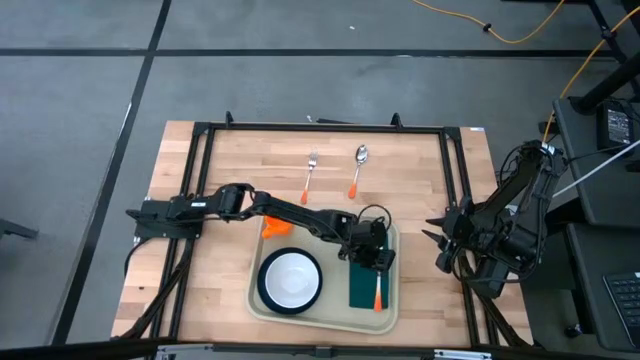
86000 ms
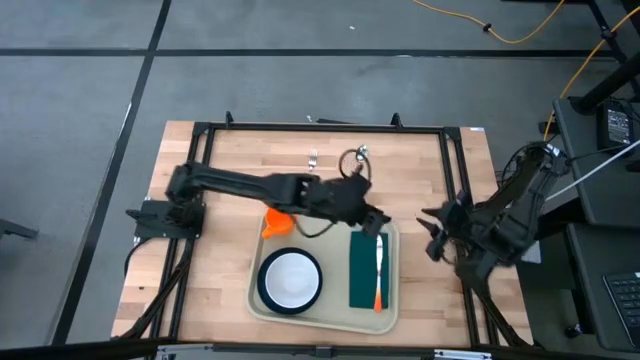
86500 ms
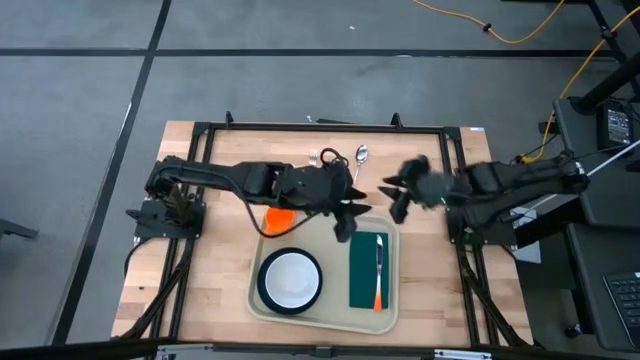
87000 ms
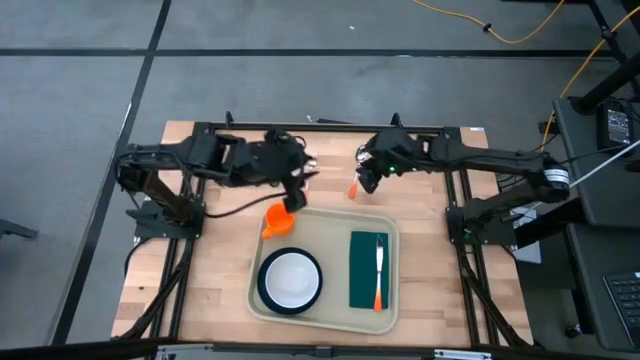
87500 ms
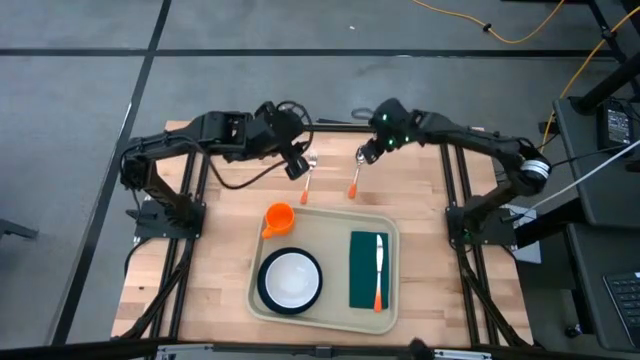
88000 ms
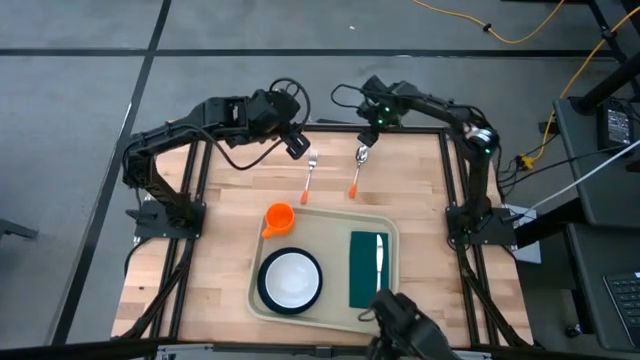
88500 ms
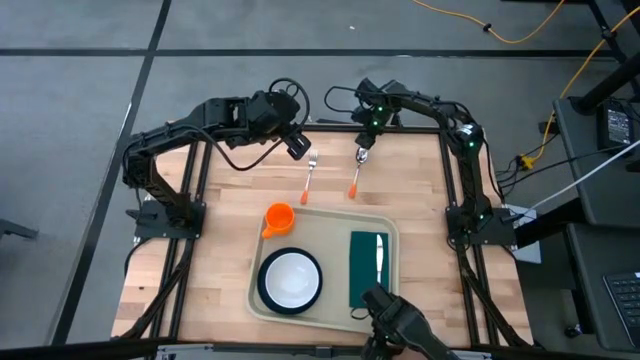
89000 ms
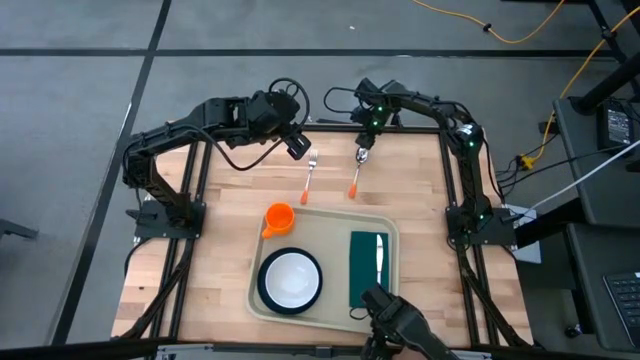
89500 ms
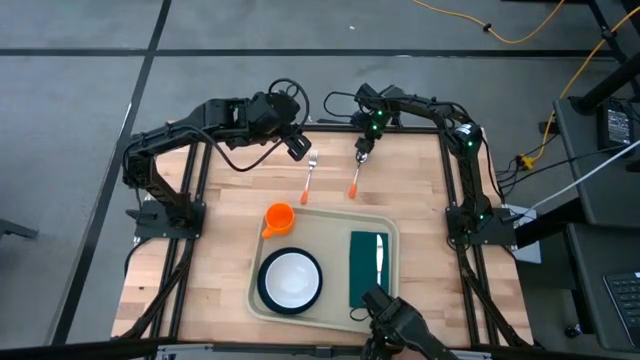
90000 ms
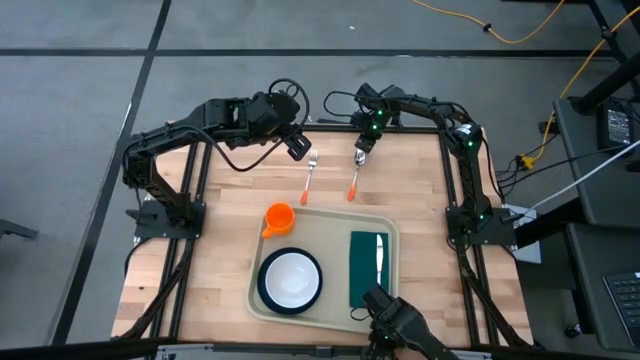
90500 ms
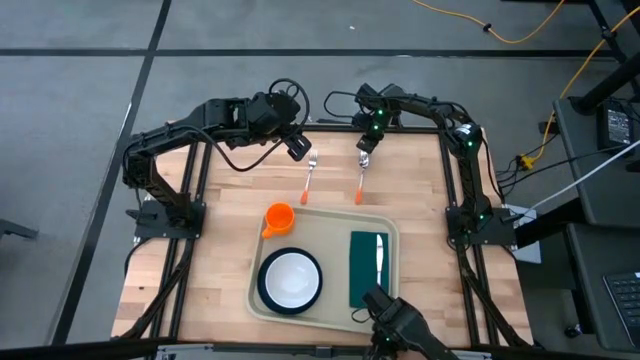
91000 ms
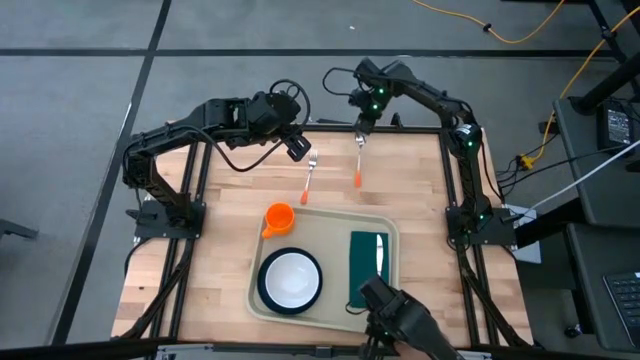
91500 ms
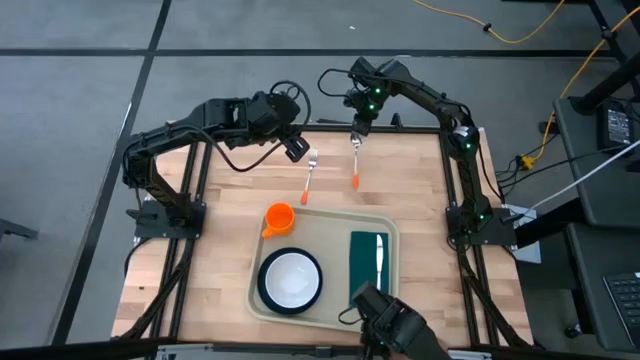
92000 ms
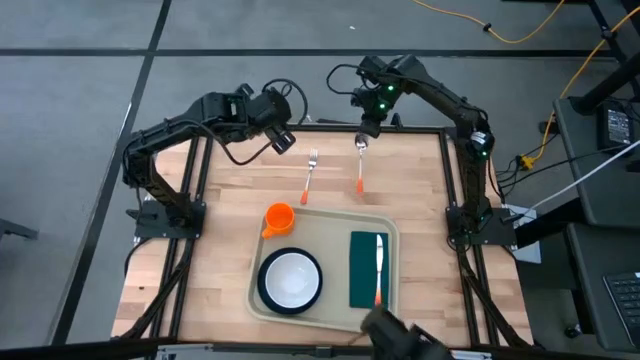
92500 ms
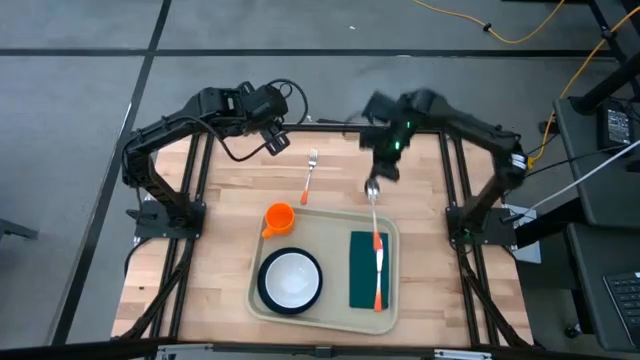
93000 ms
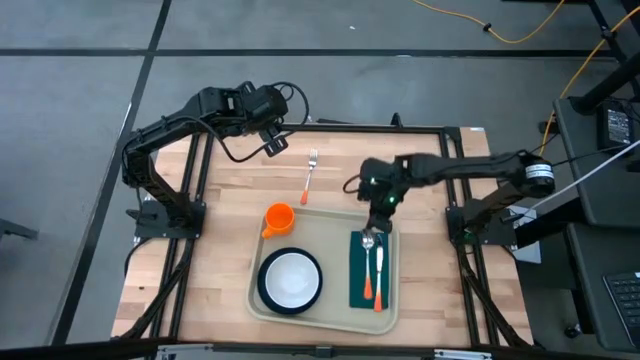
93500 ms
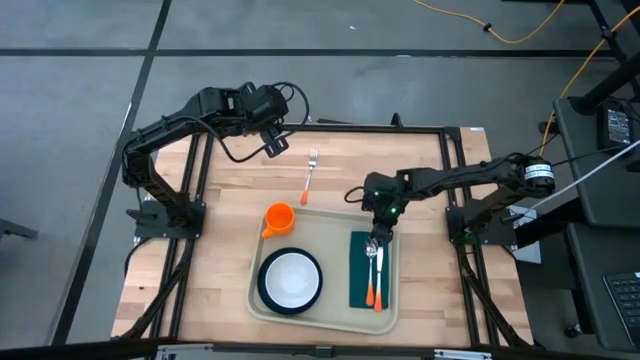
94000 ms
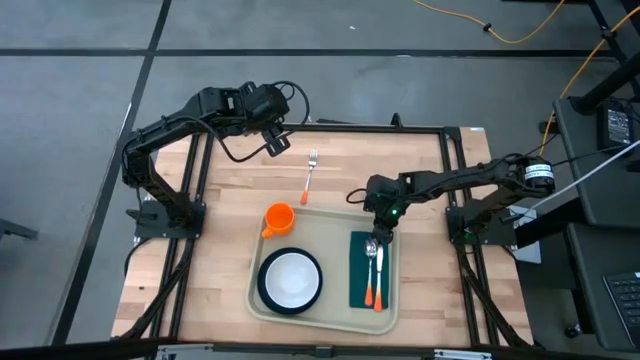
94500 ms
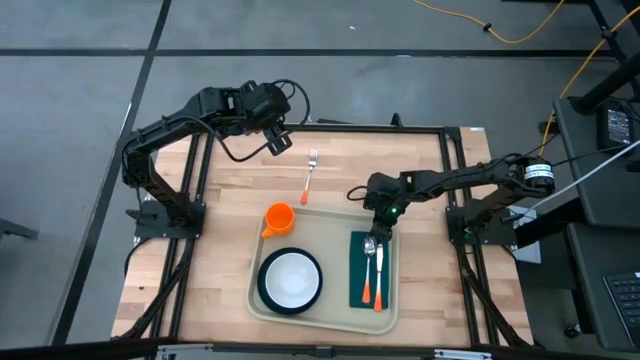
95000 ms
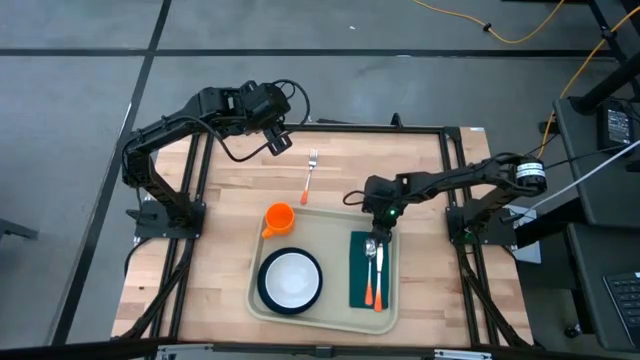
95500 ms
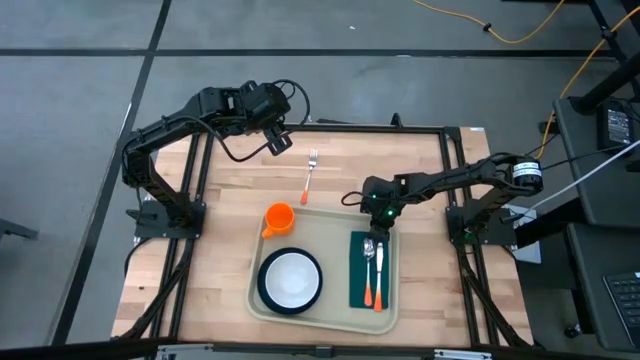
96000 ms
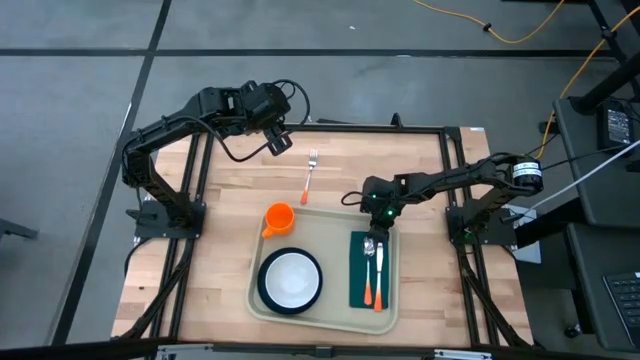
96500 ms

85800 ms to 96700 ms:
Task: Set up tray
Put the orange spoon on the dark green napkin to the left of the orange knife

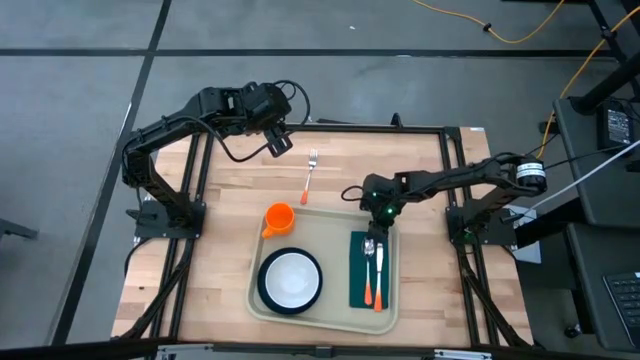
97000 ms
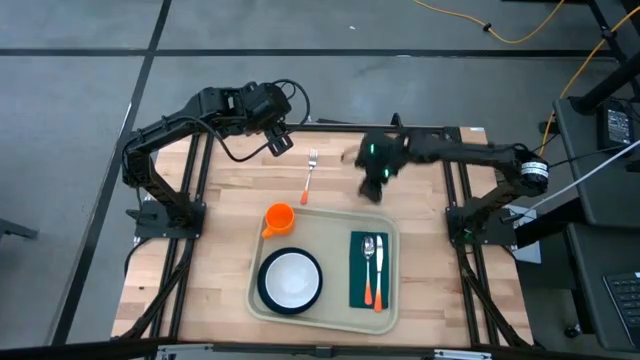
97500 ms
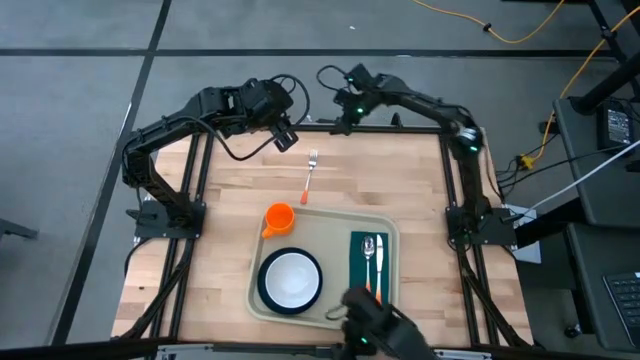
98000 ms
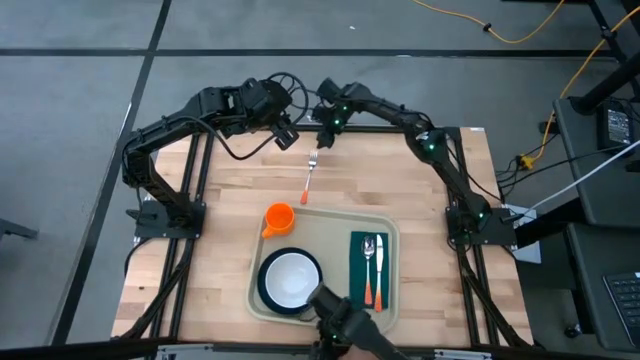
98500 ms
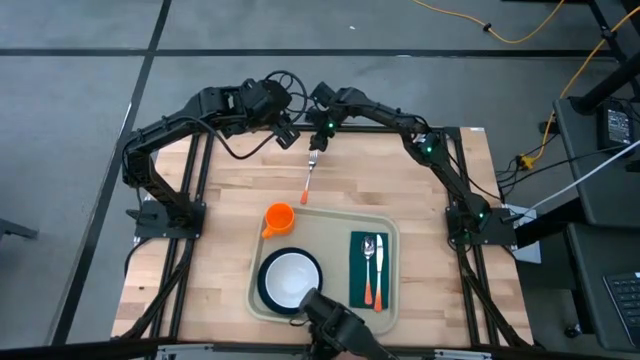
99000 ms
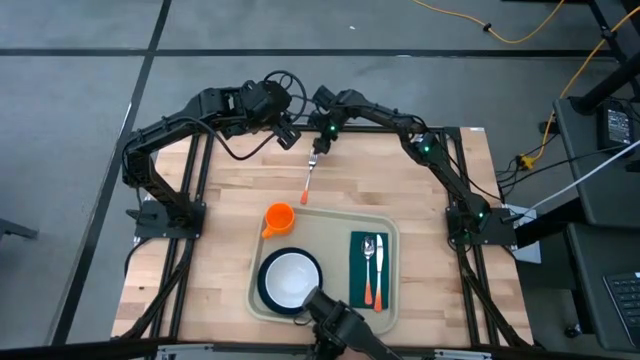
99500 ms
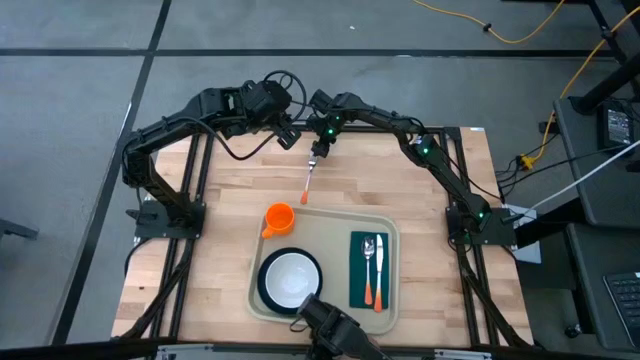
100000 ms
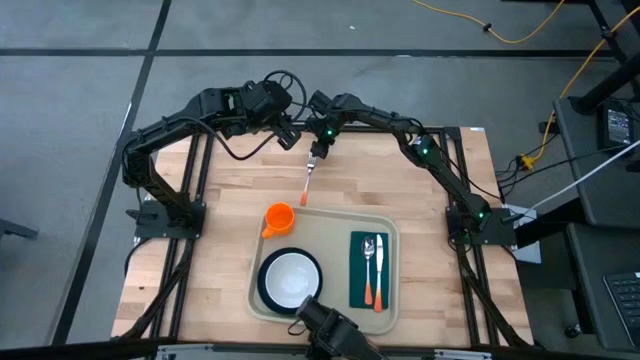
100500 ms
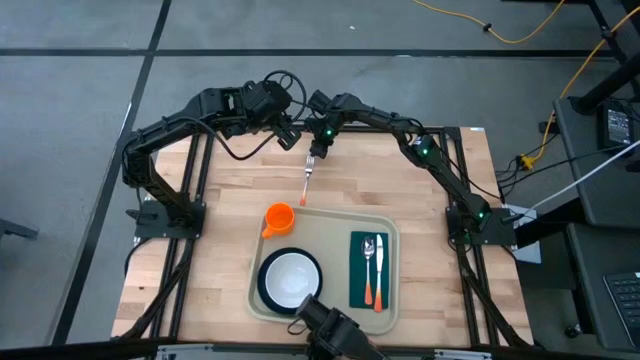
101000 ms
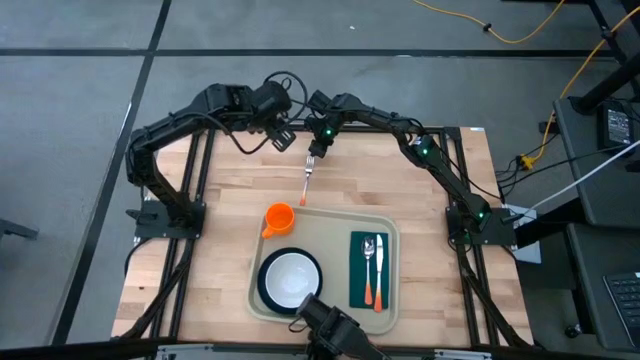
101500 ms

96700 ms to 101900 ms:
Put the orange fork on the dark green napkin to the left of the orange spoon

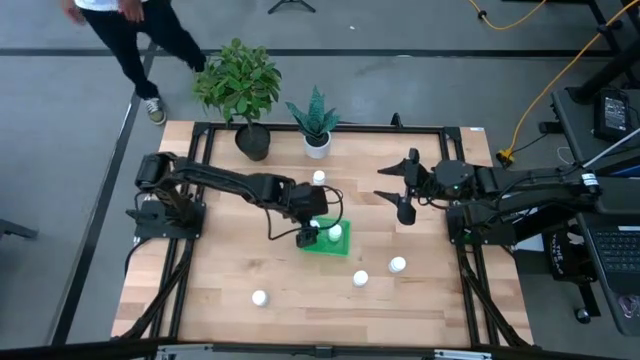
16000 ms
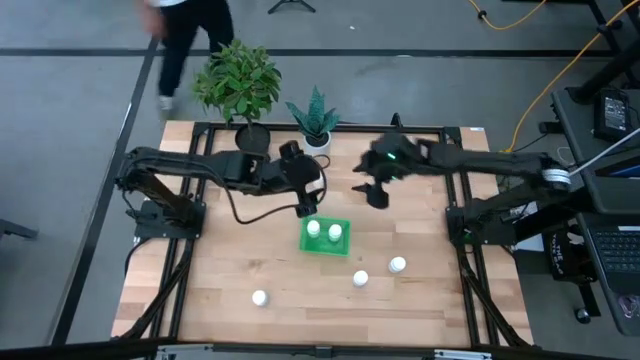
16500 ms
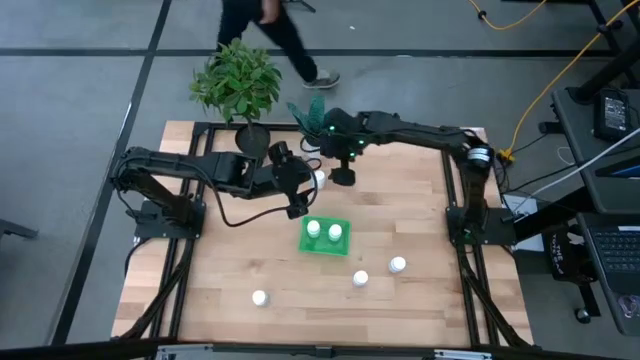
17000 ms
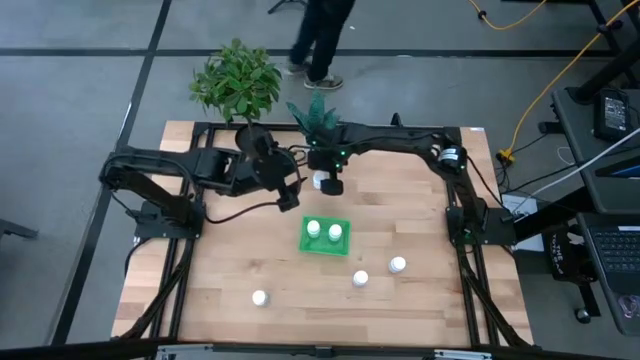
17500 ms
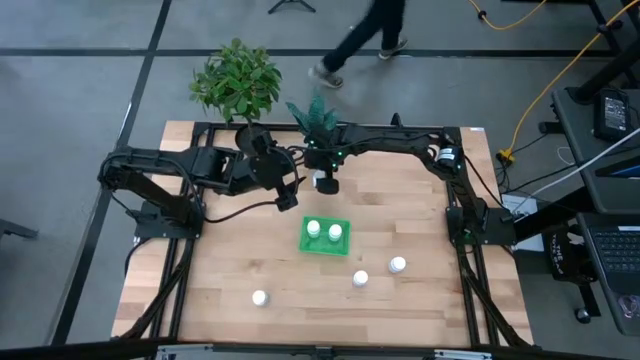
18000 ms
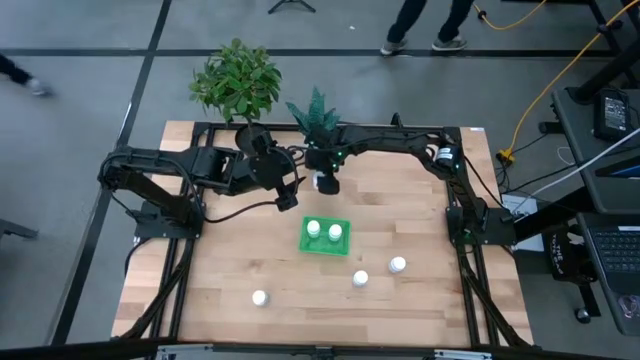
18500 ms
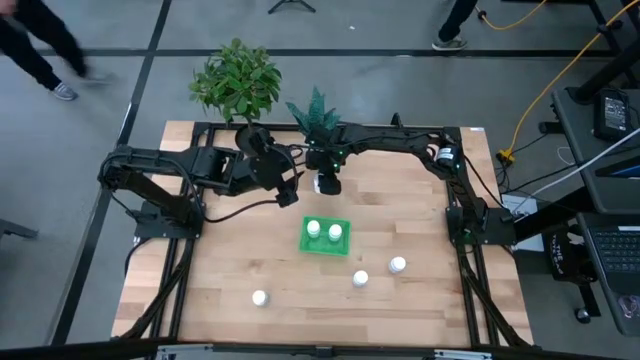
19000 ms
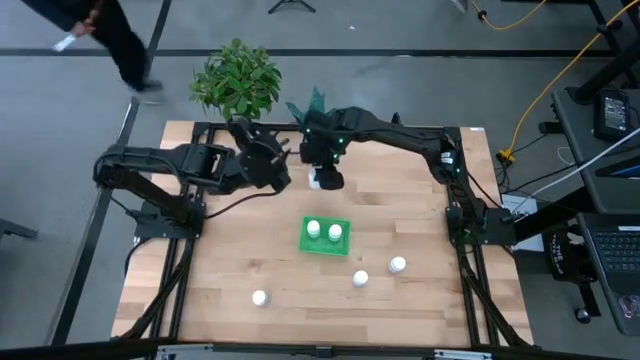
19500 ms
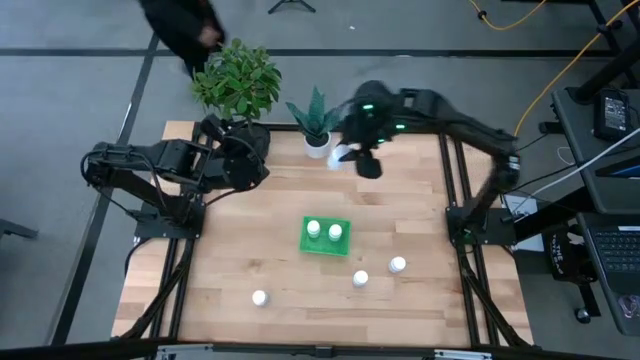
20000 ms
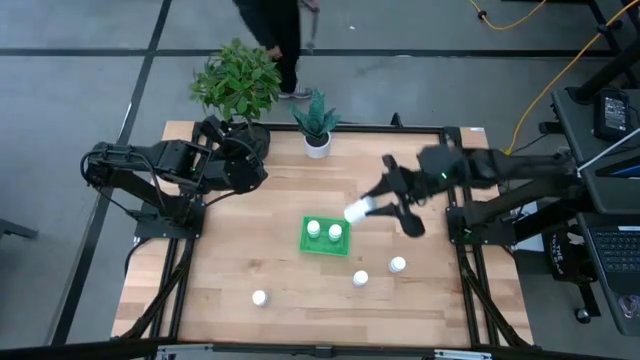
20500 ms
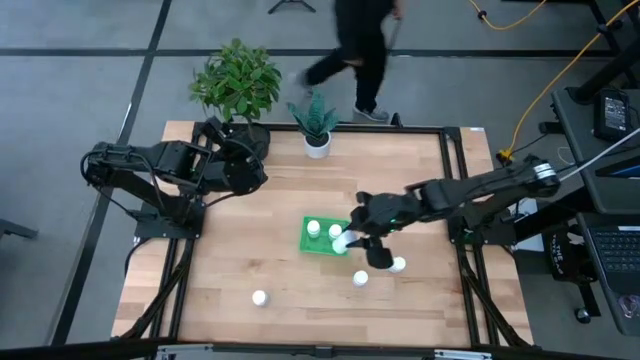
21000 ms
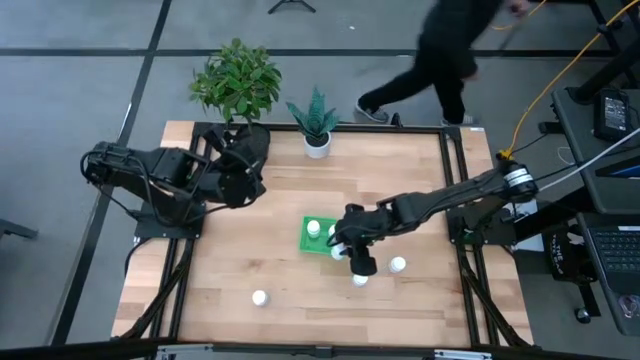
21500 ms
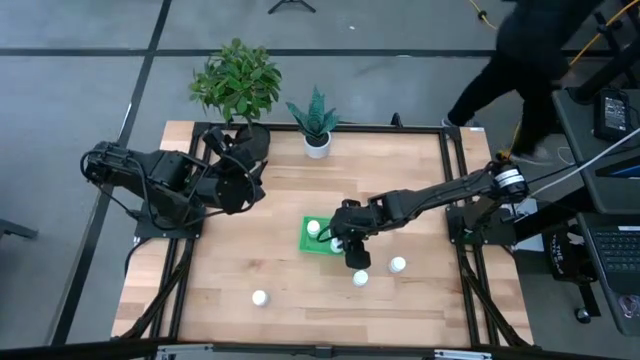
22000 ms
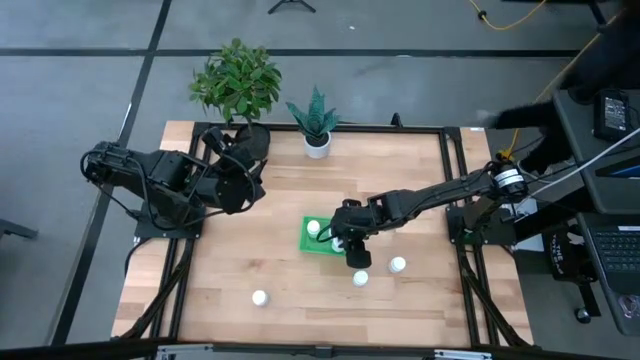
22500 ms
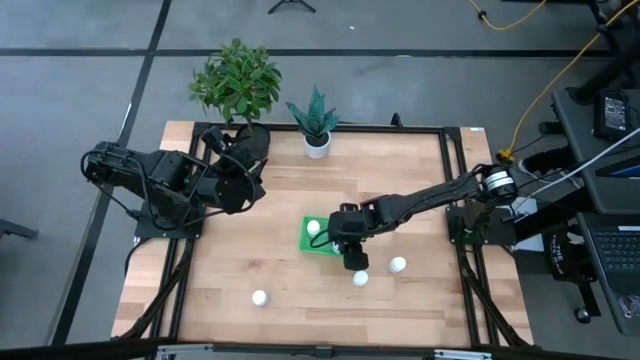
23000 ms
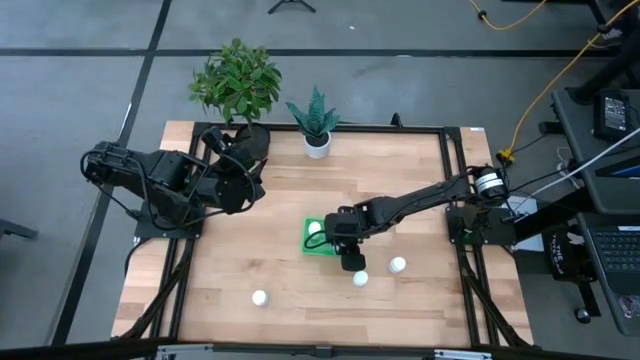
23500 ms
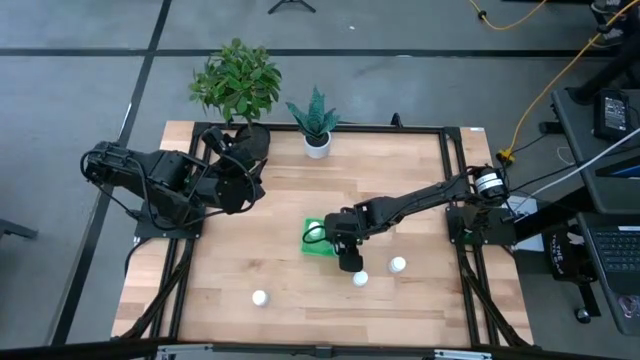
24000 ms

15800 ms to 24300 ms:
Task: Pick and place pill bottles into a basket
Put the white pill bottle into the green bin
